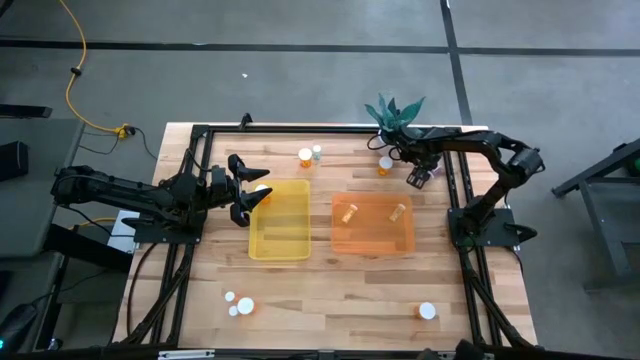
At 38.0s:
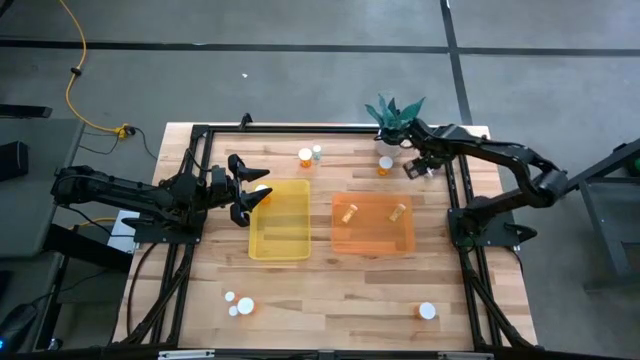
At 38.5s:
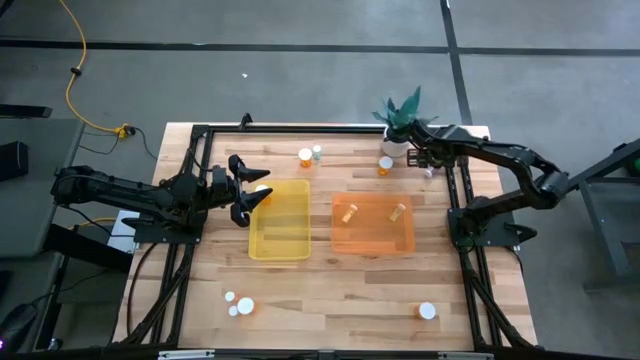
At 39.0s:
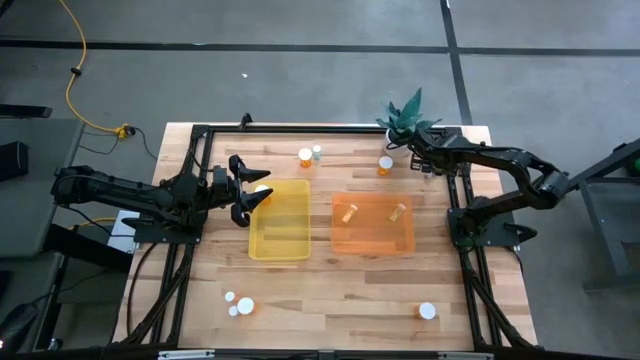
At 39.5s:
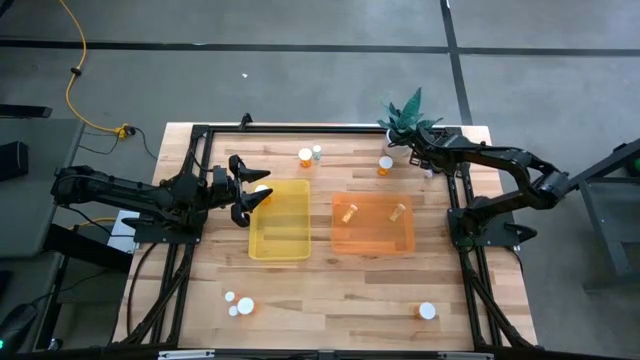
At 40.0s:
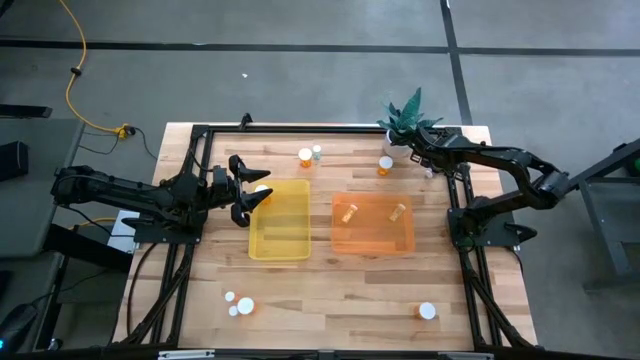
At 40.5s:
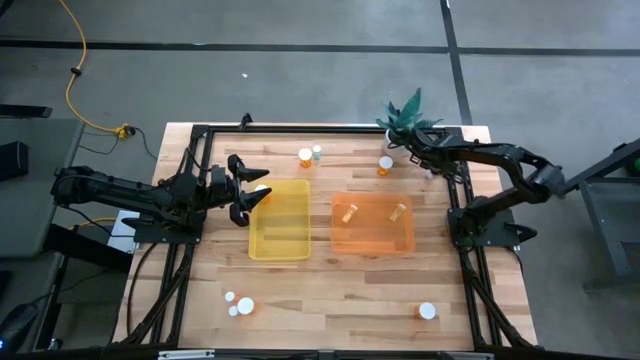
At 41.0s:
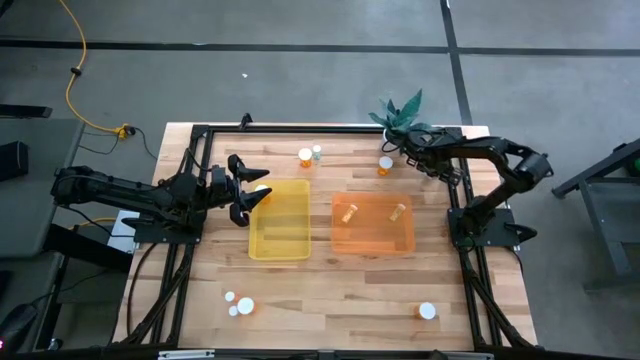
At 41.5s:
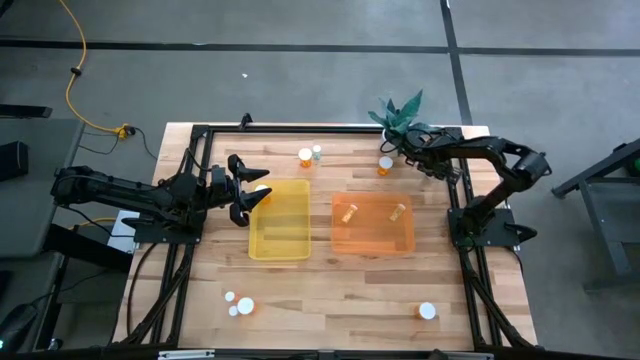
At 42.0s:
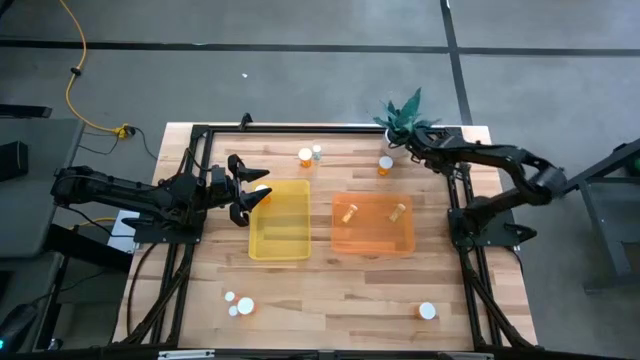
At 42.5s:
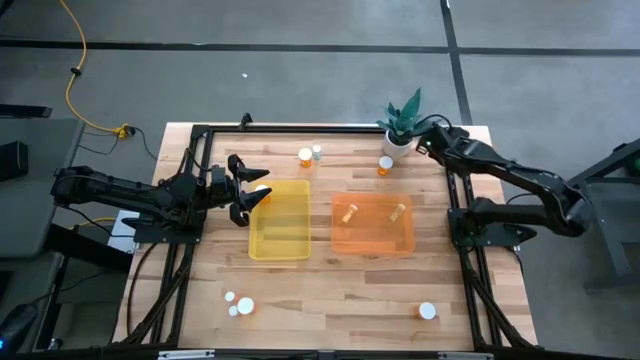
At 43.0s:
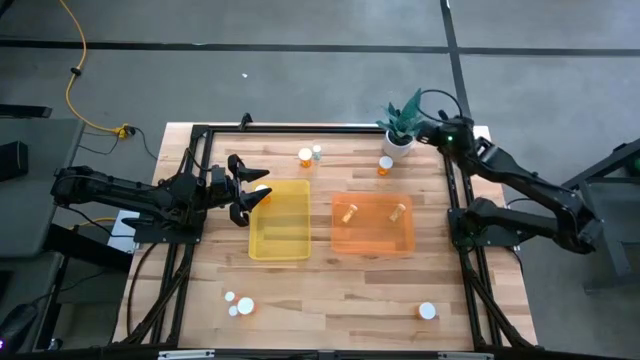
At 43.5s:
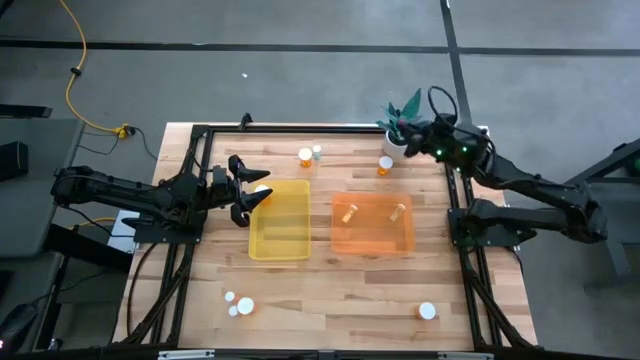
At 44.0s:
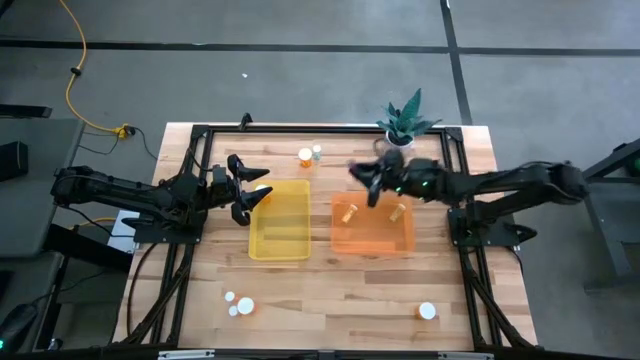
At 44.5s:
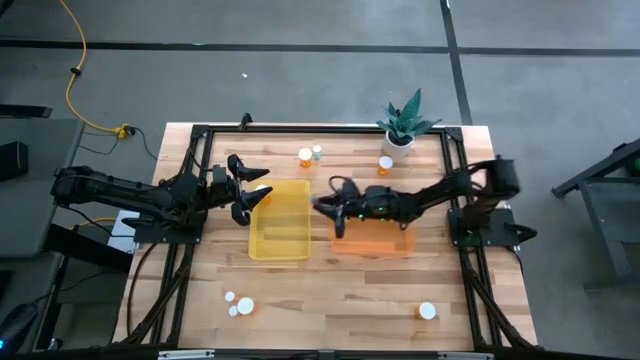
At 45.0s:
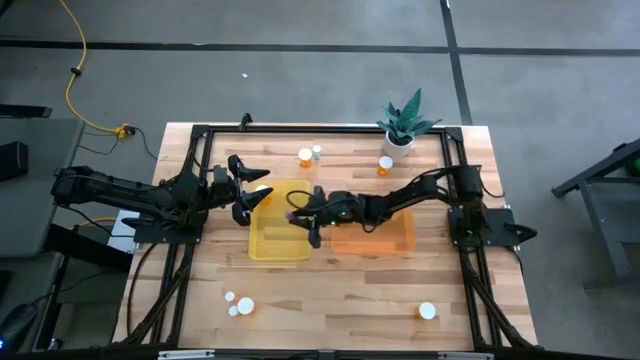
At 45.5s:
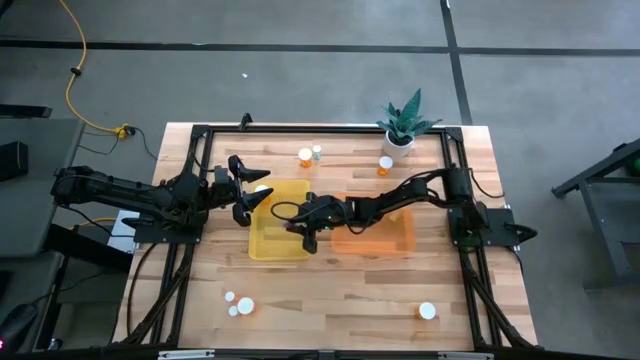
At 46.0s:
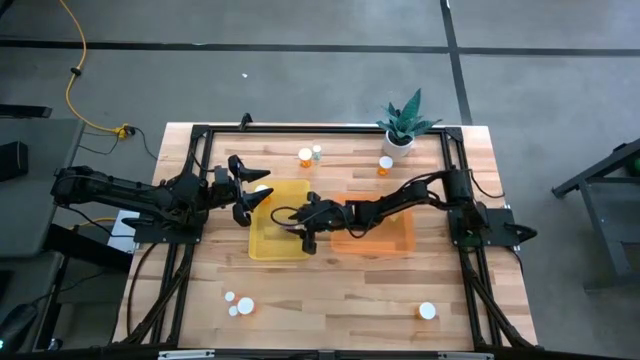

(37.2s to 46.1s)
Task: Pick and place medicine bottles into bin by pill shape (circle, oval)
Put the small blue capsule bottle into the orange bin

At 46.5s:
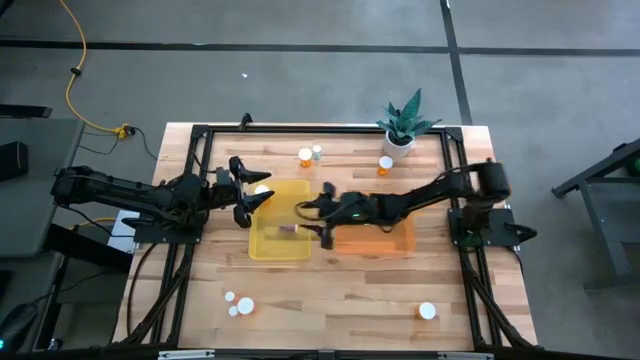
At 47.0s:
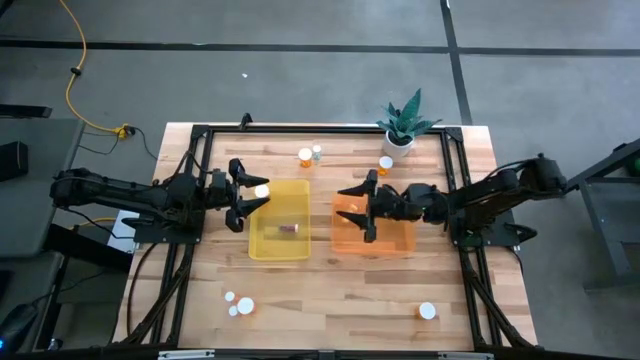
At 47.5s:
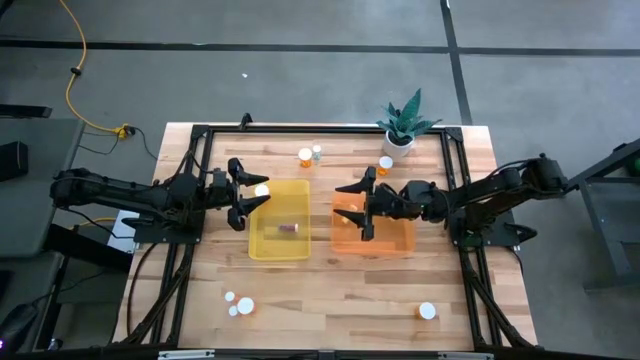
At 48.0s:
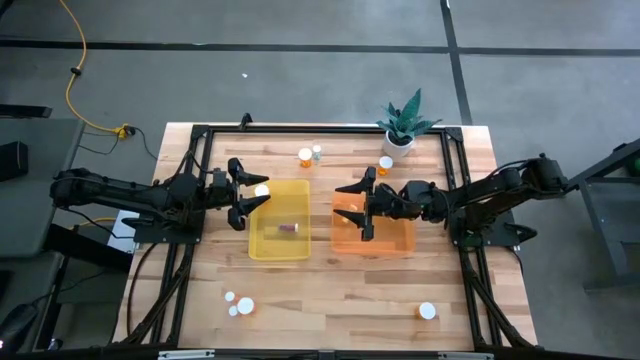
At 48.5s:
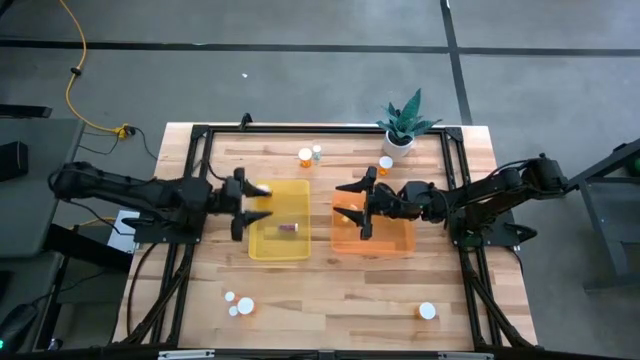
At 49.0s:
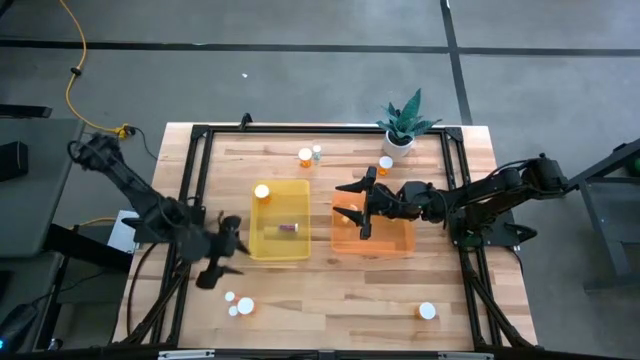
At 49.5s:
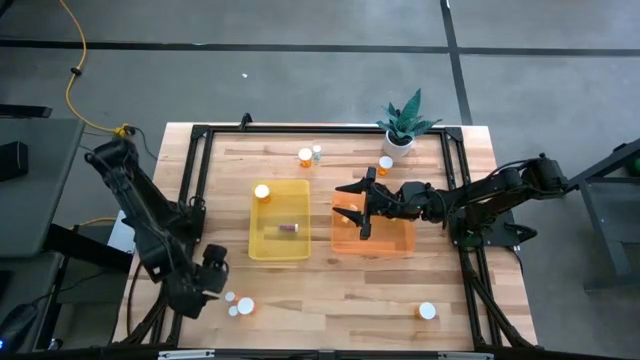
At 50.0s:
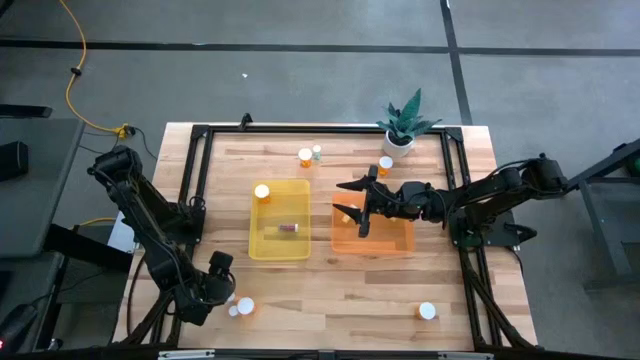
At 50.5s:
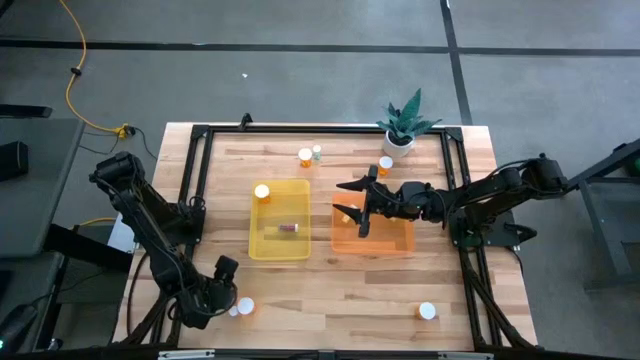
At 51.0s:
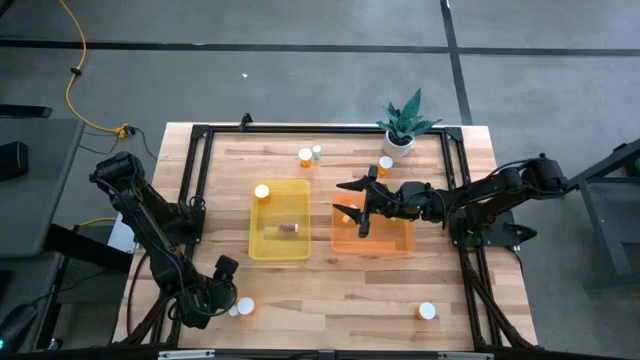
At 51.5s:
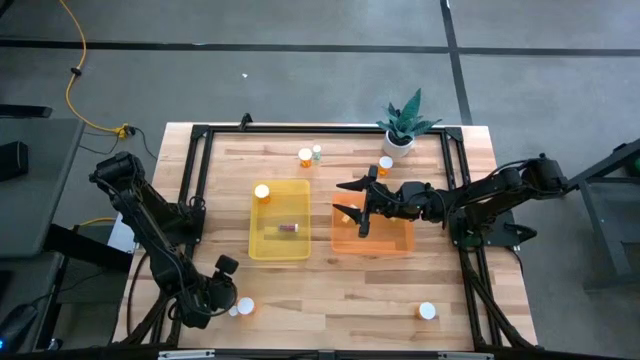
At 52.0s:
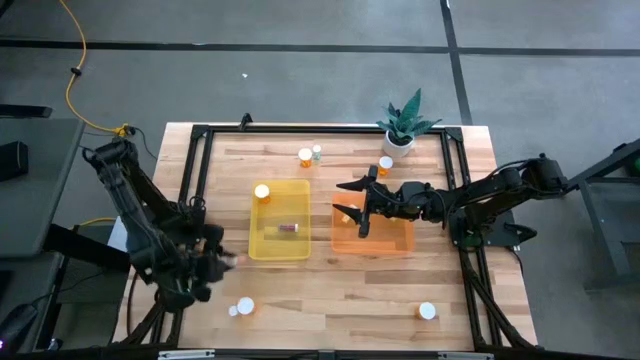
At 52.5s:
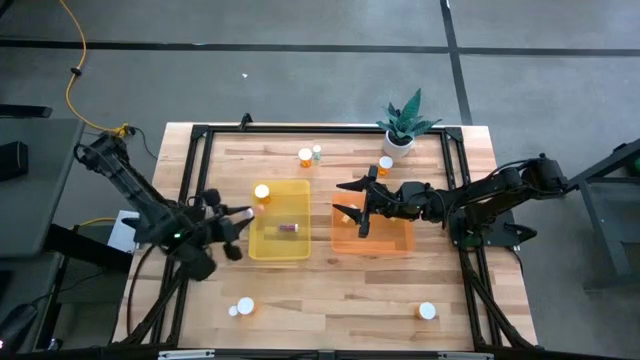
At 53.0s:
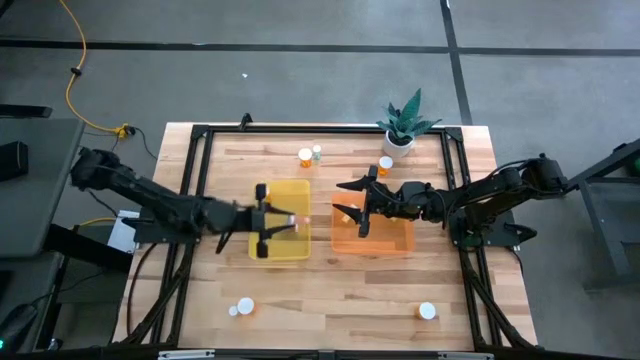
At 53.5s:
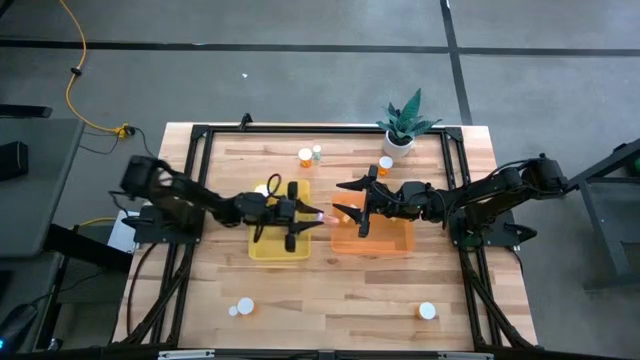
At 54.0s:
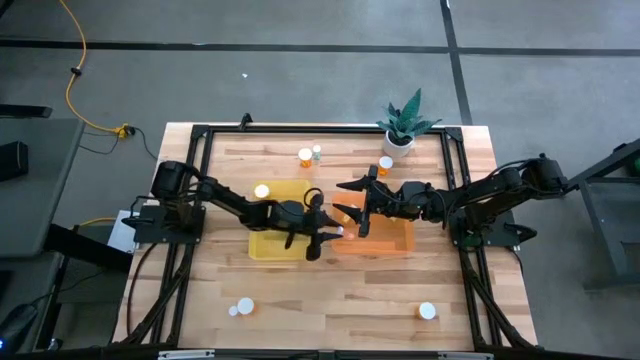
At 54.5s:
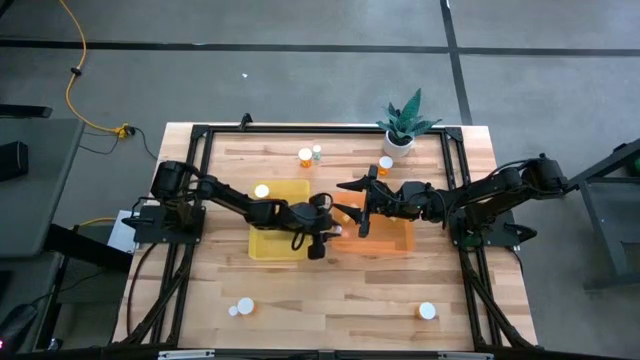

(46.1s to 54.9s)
Put the small pink tablet bottle into the orange bin

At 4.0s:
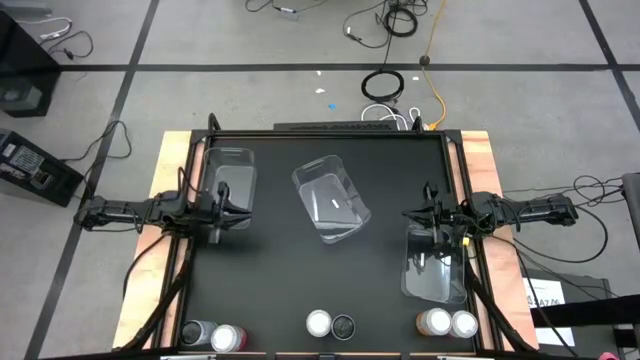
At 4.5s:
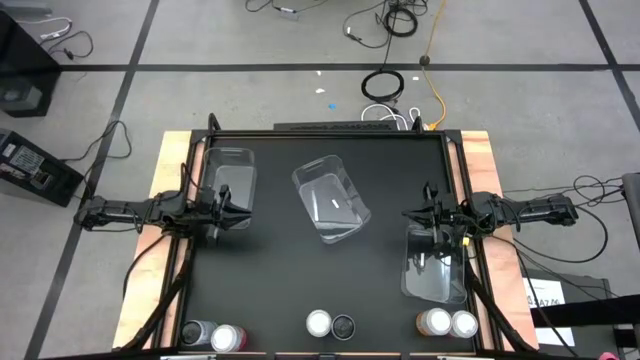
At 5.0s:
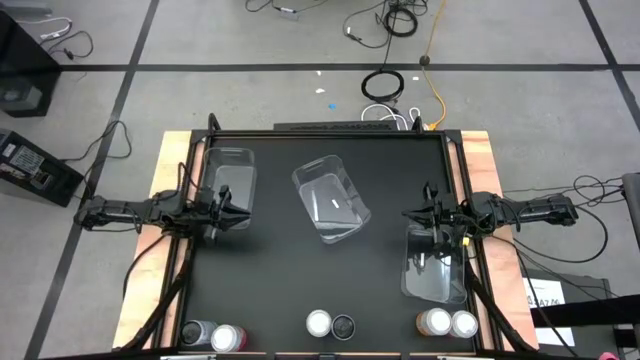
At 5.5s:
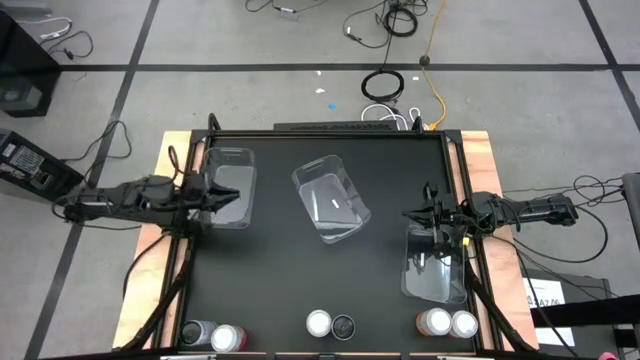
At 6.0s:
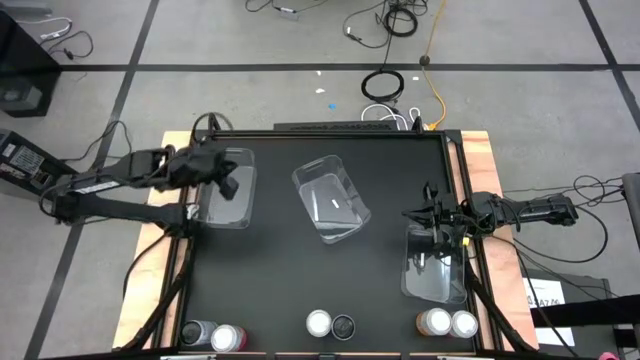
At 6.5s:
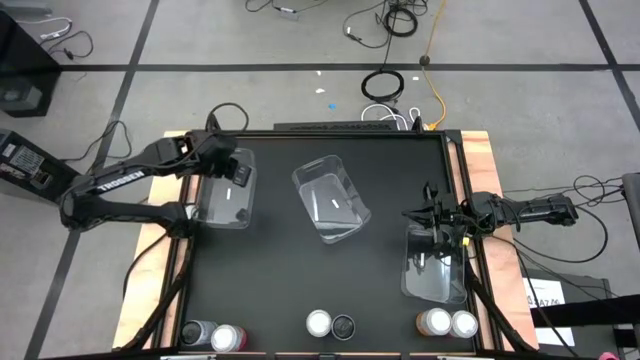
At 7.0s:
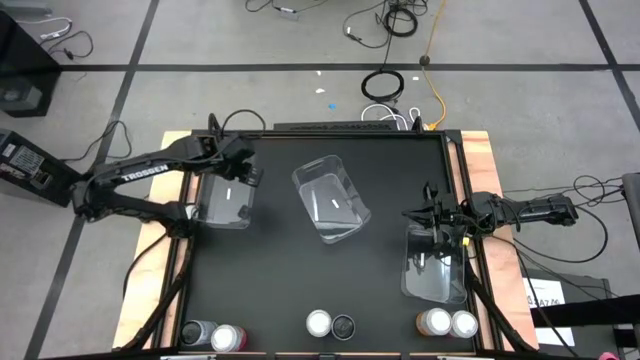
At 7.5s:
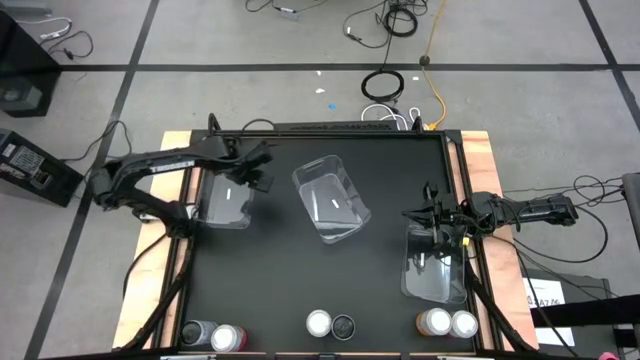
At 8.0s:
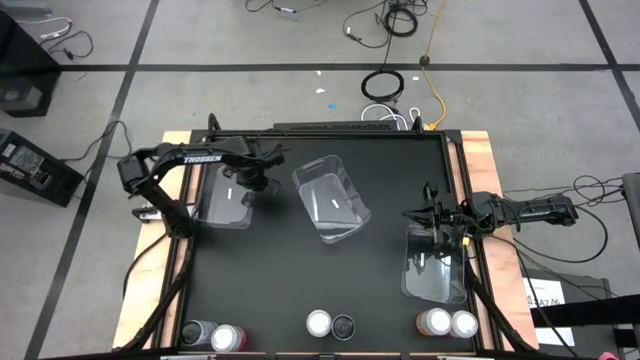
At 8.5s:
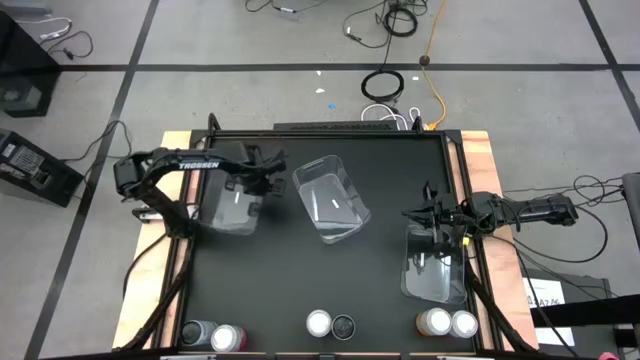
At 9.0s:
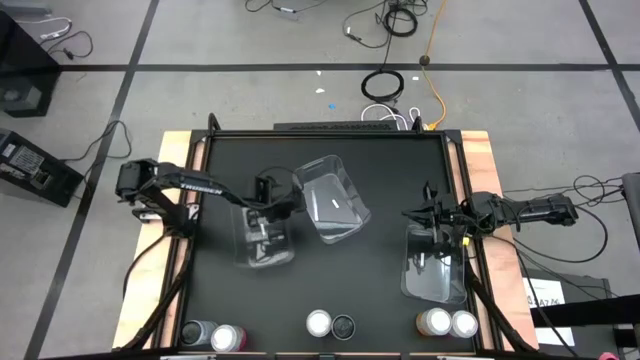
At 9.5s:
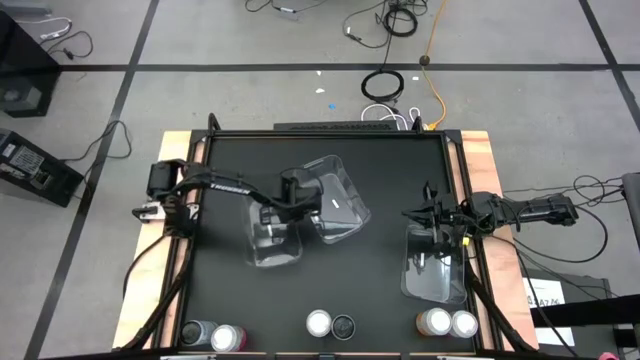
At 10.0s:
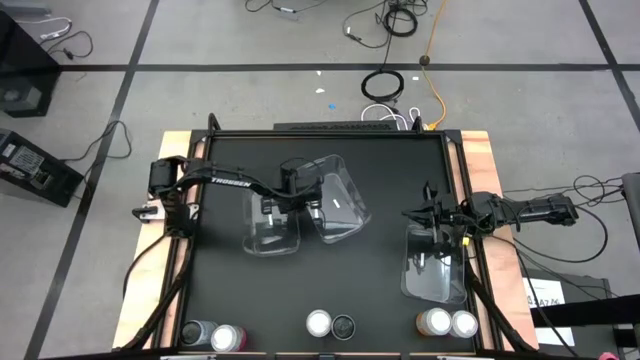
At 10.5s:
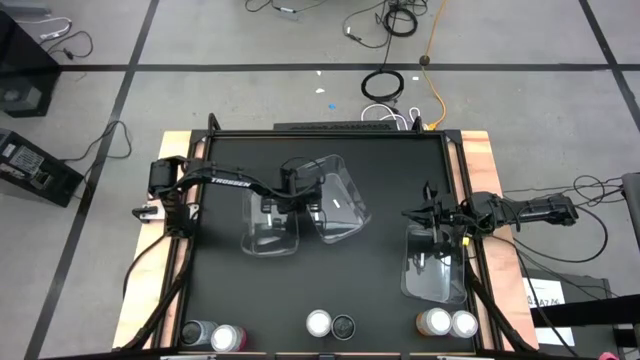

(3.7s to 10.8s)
Task: Sort soda cans
Move the top left transparent bin to the middle left of the table
